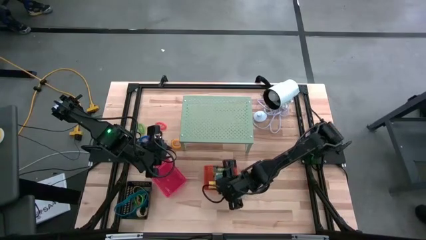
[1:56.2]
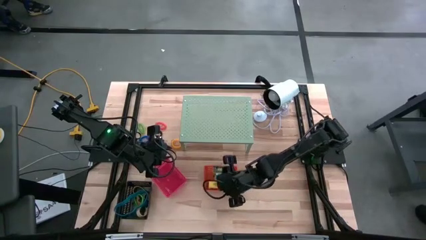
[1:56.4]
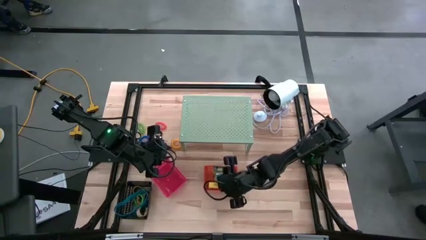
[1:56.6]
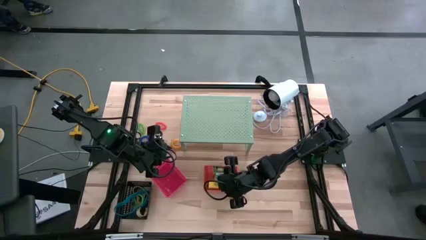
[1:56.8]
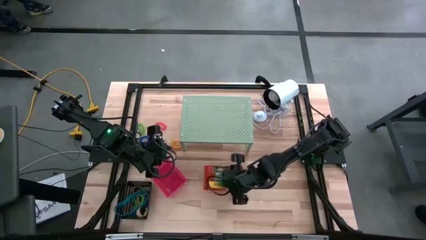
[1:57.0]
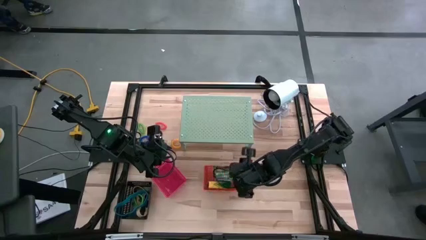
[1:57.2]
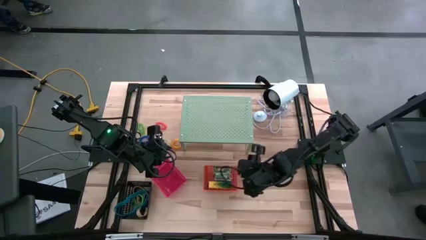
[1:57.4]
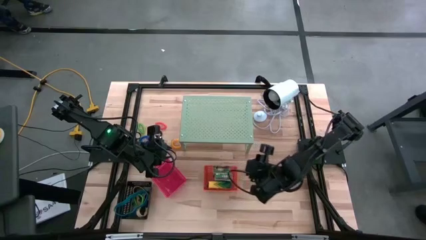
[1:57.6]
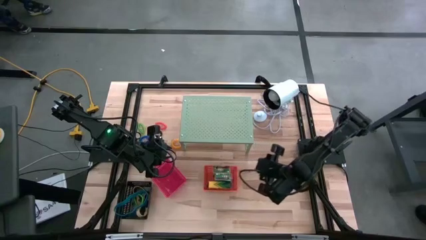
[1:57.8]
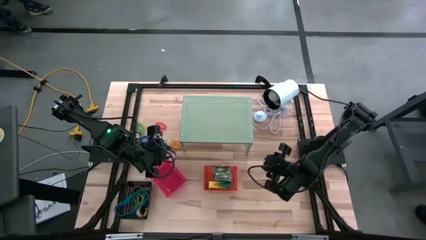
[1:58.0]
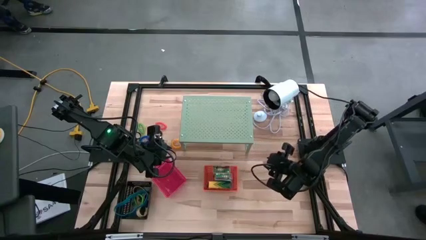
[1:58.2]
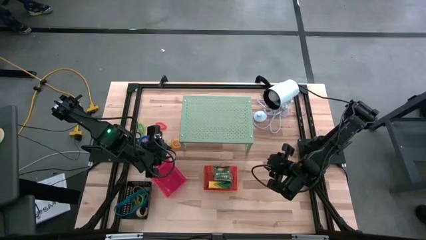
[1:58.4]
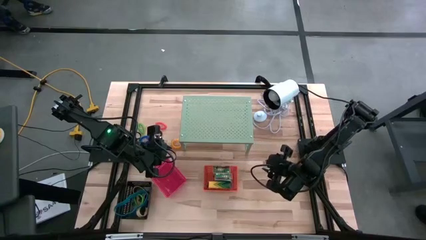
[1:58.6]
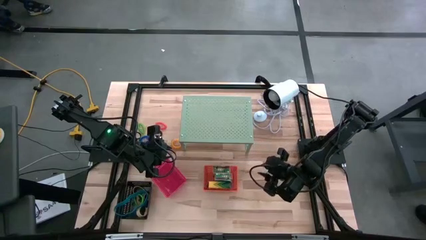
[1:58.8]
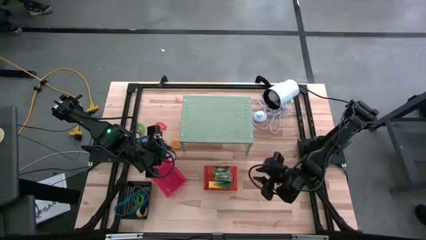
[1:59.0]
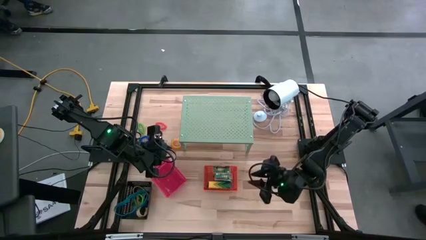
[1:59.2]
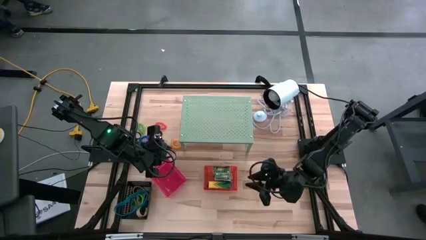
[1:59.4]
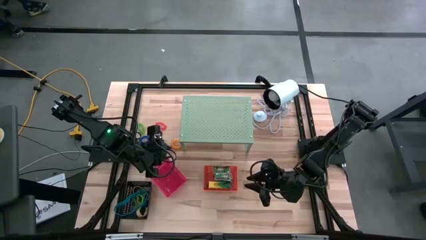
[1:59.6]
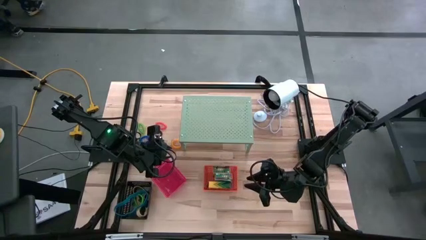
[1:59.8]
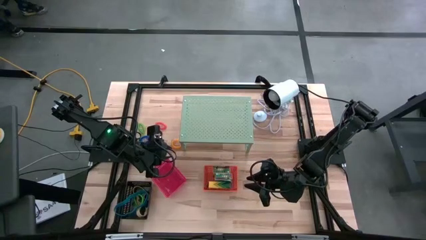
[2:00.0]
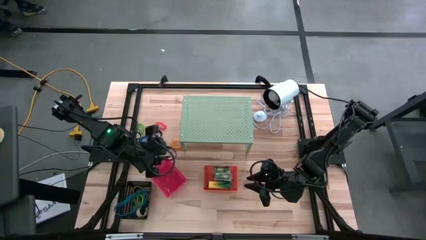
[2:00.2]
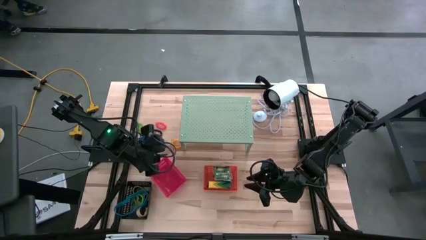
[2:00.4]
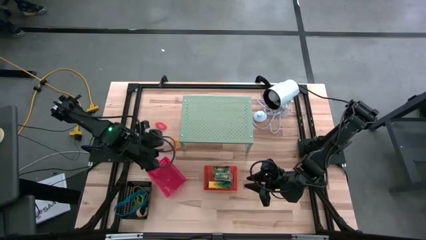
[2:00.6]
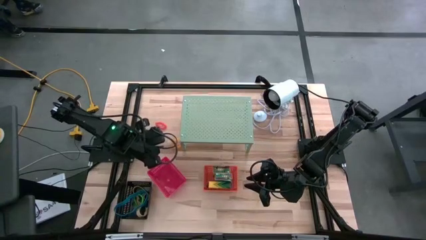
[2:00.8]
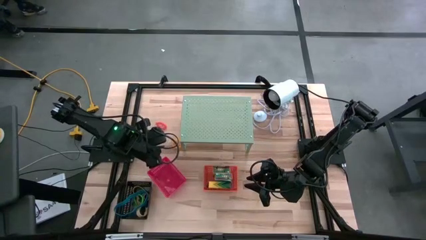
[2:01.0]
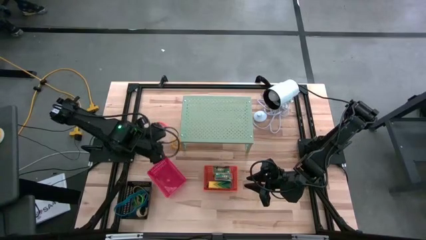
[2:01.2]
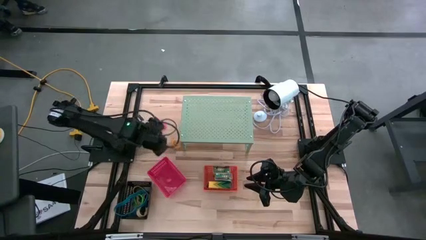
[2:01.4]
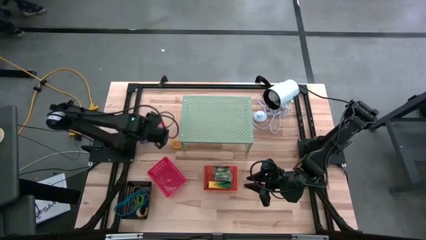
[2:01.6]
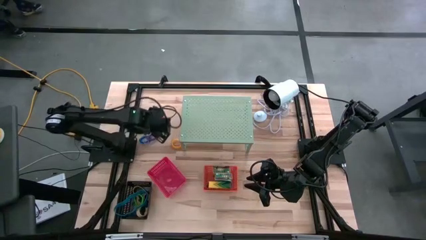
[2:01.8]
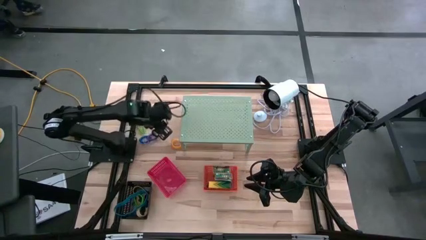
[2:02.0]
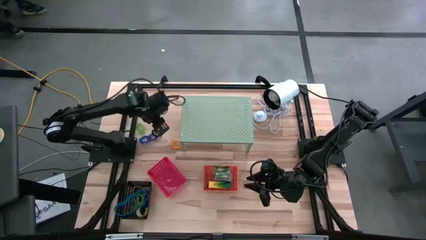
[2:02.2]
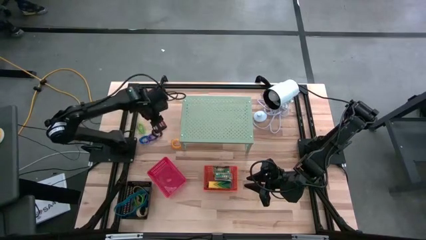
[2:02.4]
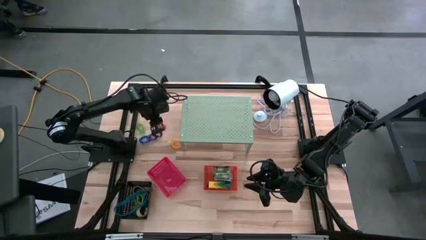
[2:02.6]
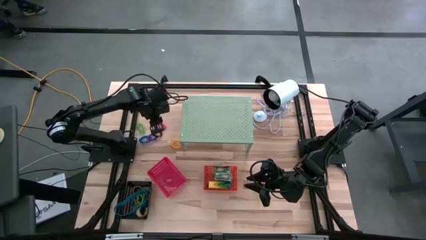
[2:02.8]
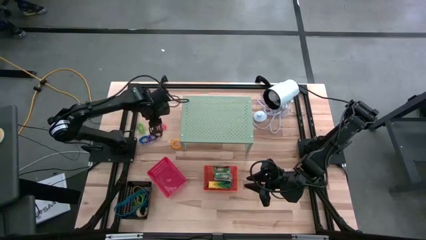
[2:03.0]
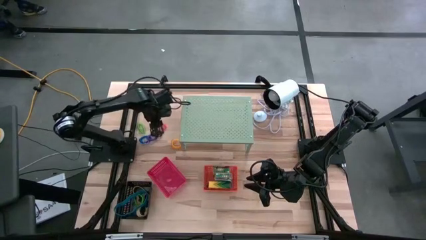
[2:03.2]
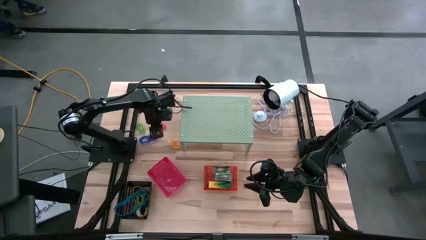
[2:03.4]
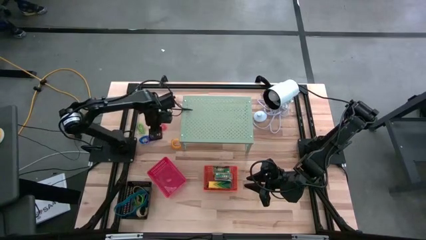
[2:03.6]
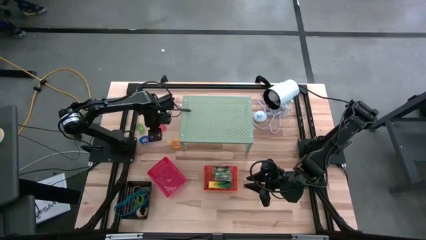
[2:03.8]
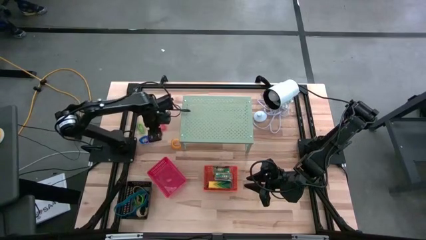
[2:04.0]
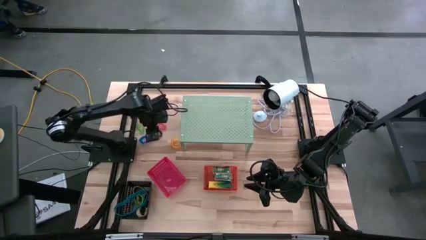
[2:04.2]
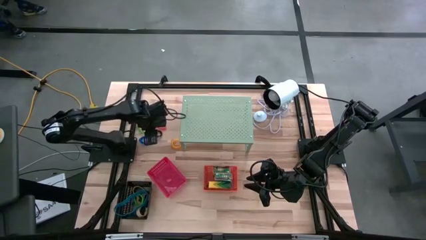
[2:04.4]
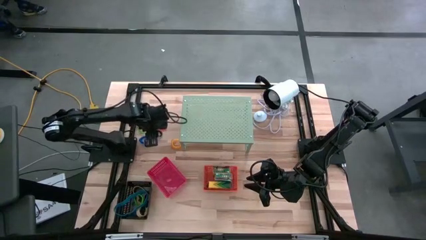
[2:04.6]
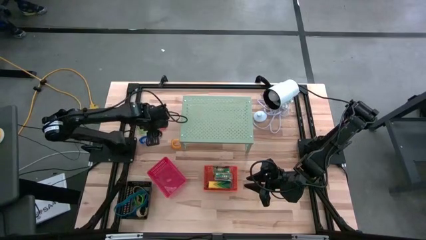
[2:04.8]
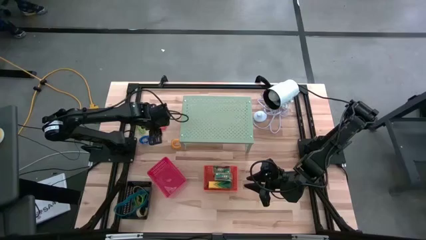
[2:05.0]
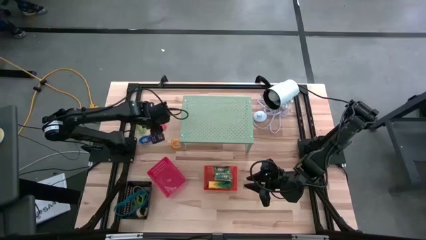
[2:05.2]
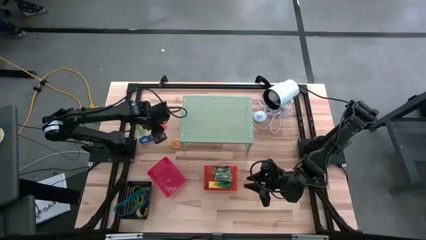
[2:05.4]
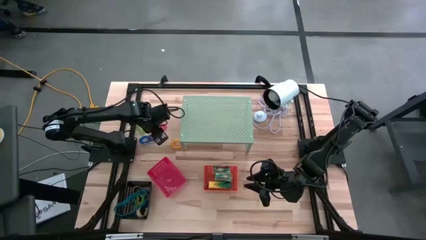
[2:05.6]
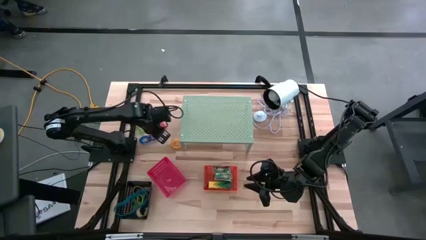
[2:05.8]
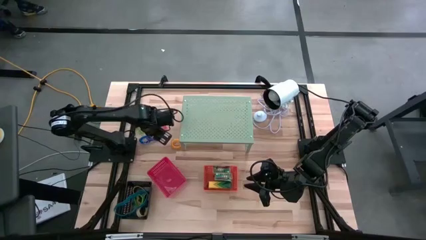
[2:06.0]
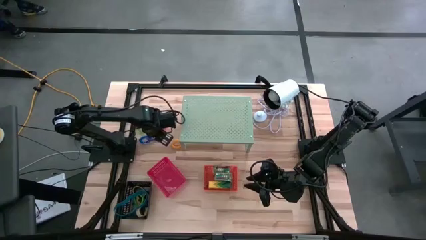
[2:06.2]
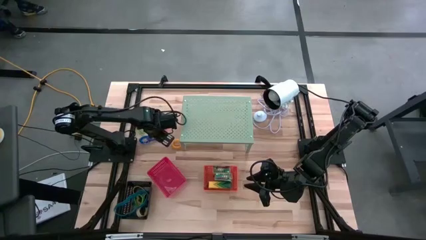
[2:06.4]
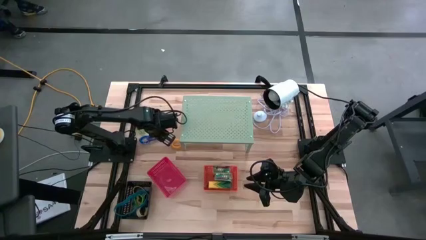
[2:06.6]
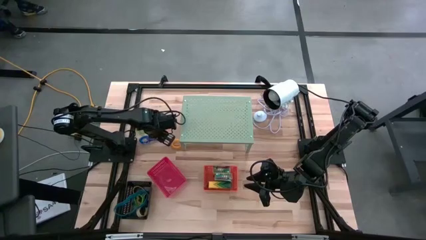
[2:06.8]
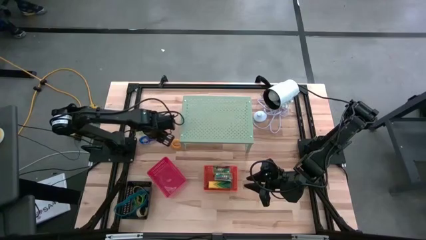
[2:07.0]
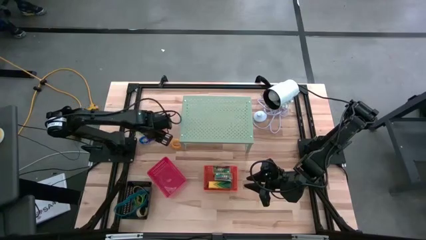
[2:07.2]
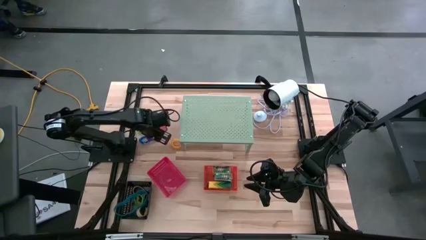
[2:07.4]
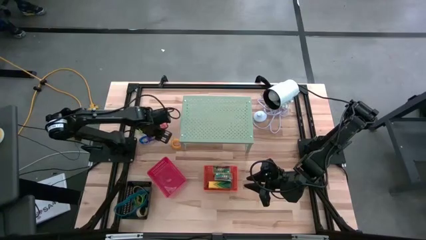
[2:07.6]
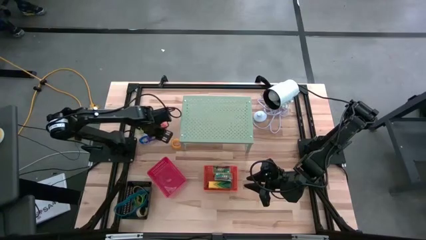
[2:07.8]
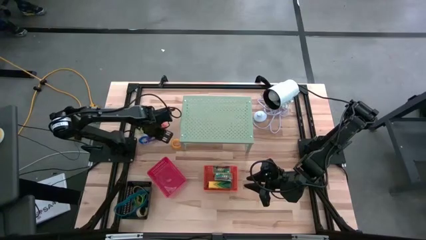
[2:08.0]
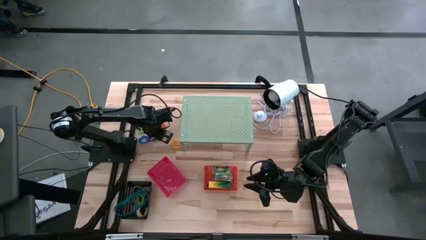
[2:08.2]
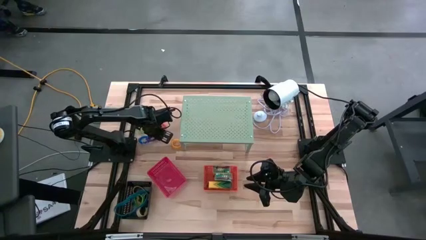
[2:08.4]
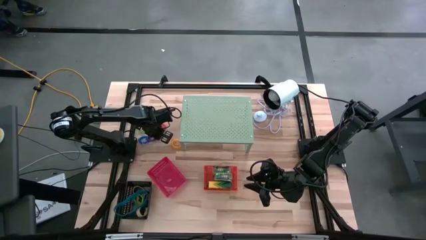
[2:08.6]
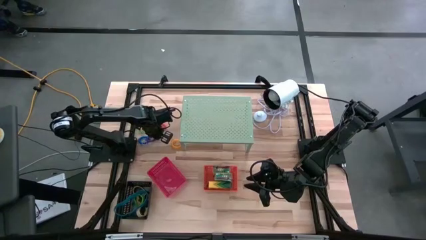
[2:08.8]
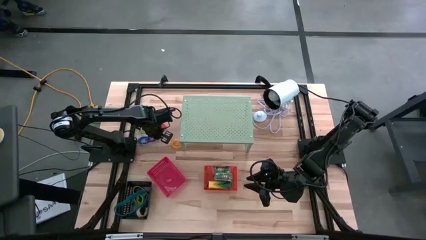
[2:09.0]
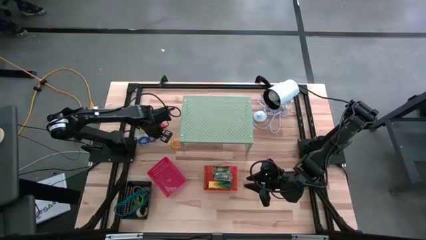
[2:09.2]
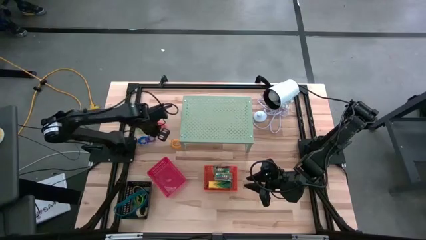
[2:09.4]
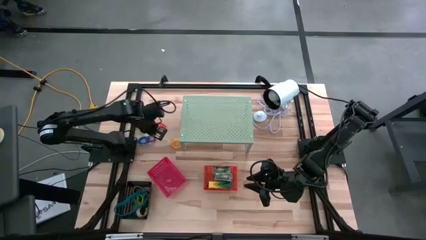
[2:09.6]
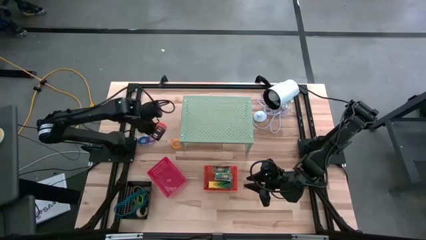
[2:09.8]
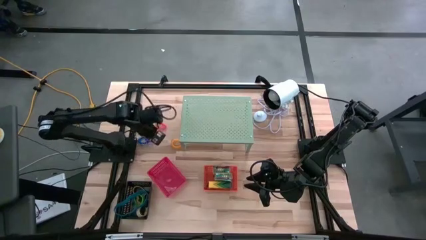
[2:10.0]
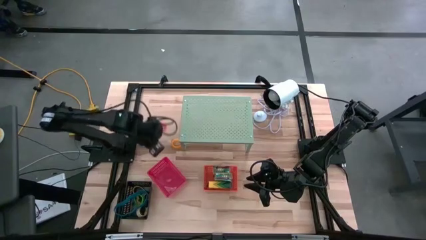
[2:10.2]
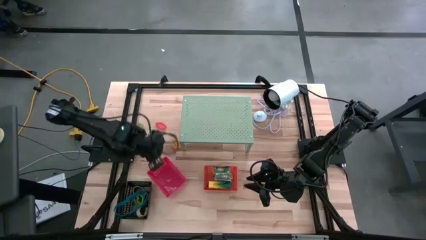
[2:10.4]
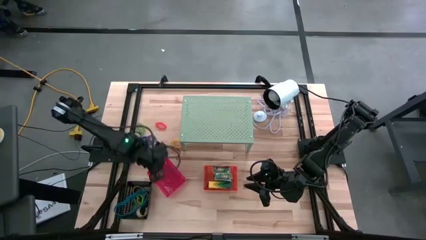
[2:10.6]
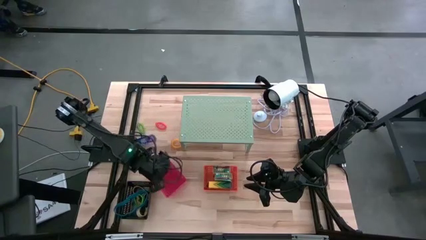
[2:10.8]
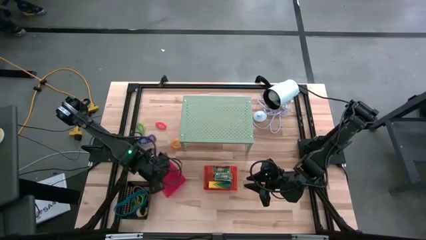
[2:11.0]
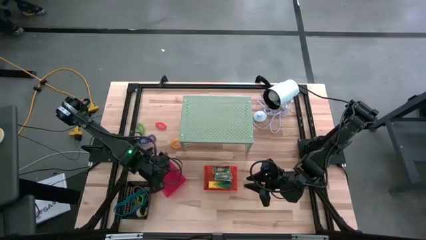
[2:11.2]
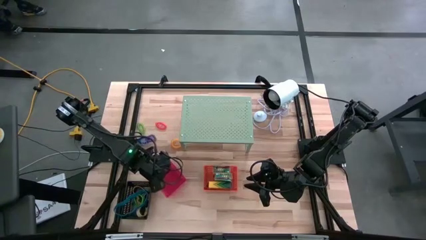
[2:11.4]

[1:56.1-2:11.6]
Task: Pick & Place Office Desk Supplies
Put the black spring keychain into the red bin

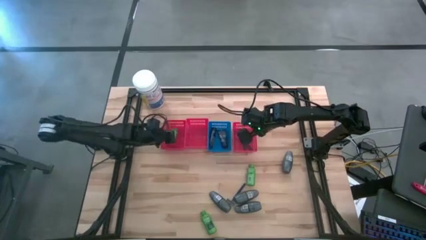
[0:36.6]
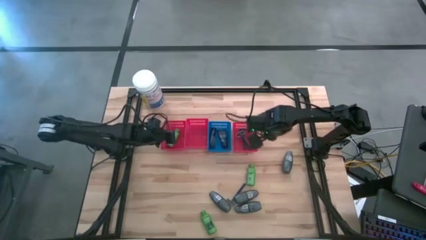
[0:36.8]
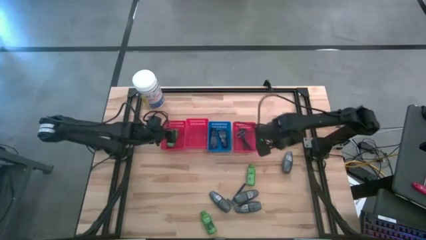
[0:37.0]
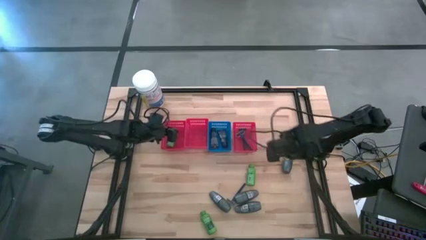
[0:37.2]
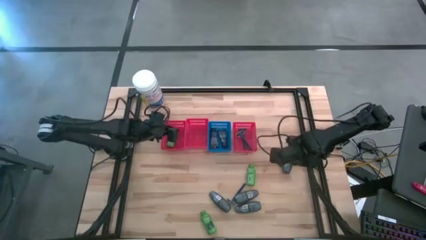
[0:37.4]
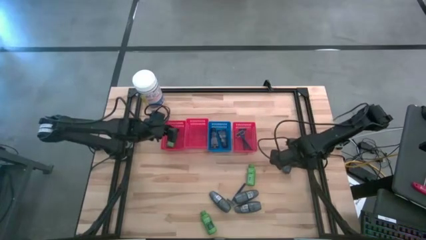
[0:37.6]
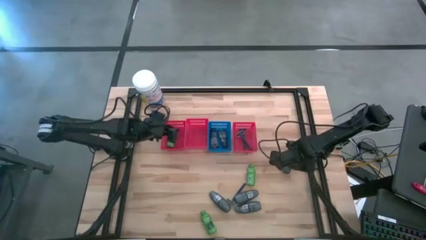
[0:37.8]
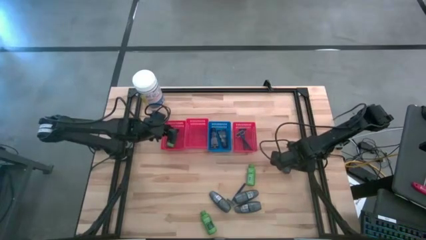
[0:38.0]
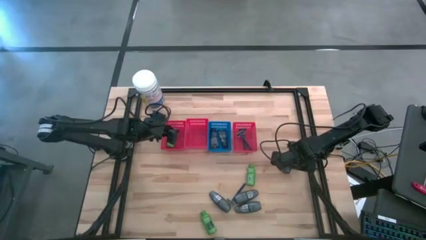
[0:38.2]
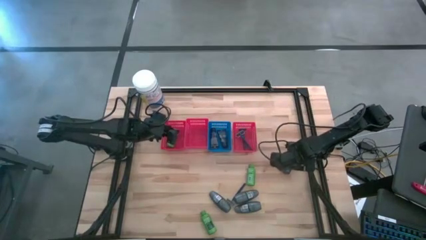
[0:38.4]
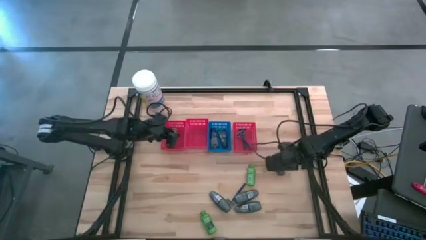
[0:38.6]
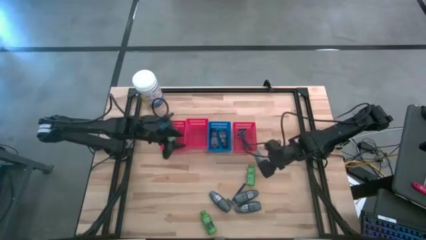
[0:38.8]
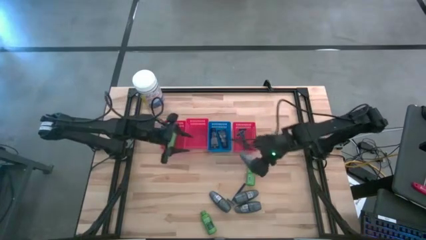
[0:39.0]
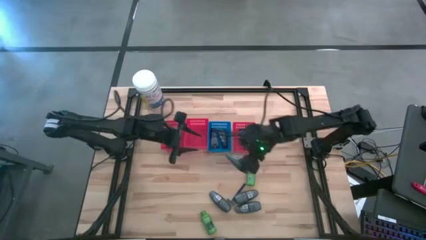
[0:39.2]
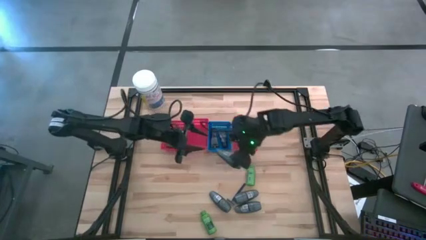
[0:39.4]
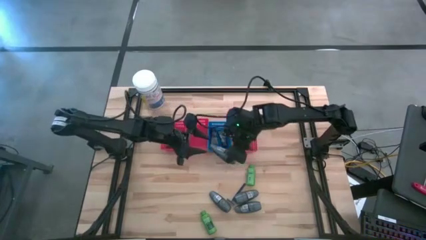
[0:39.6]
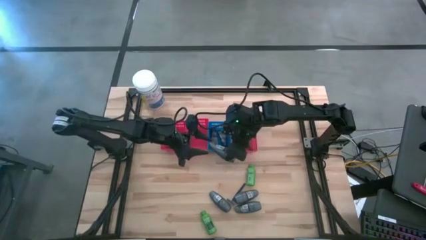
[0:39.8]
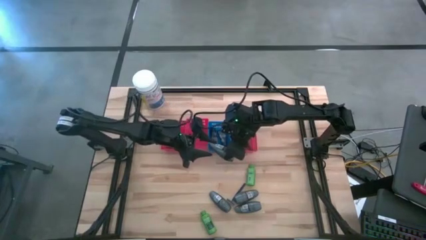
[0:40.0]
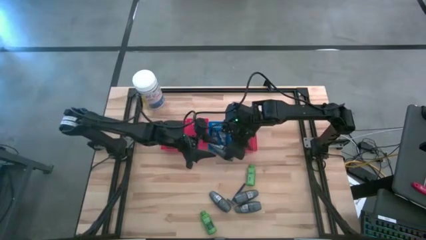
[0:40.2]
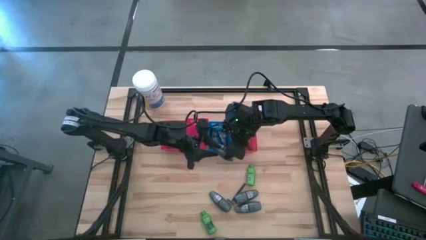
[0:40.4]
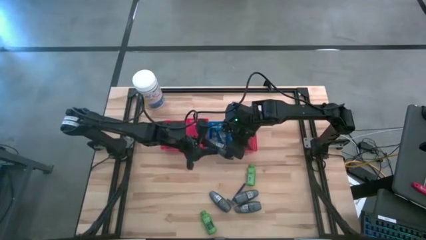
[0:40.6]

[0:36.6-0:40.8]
Task: Pick & Place Travel size toiletries
Put the gray deodorant into the middle red bin
